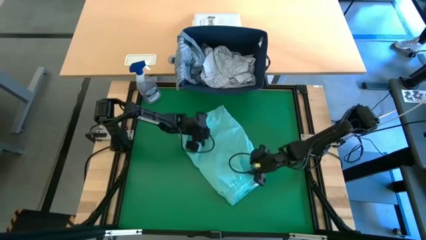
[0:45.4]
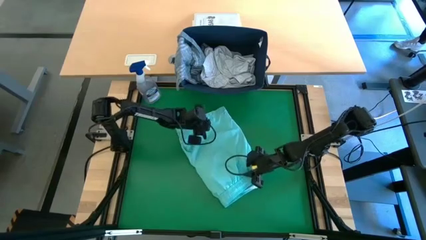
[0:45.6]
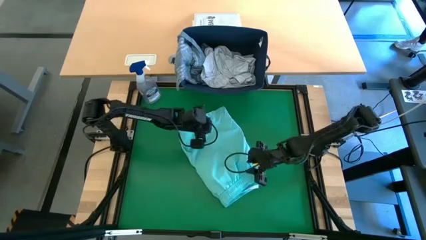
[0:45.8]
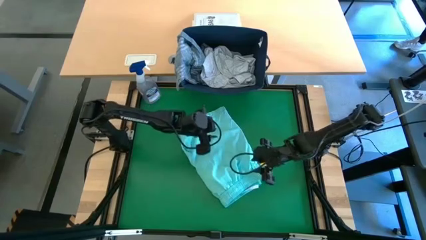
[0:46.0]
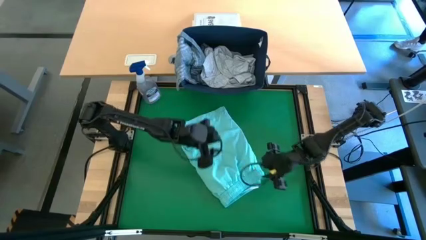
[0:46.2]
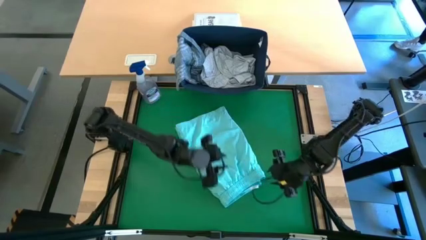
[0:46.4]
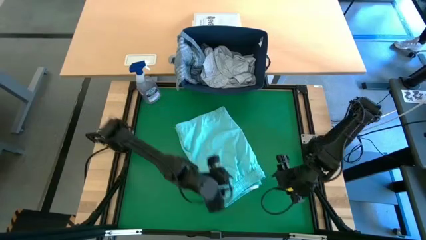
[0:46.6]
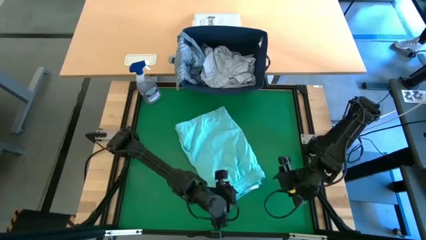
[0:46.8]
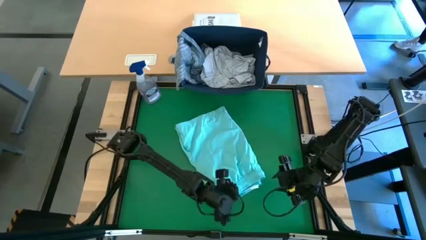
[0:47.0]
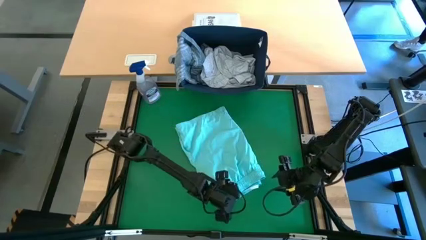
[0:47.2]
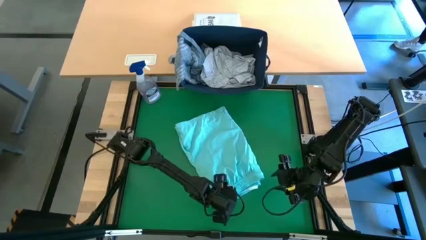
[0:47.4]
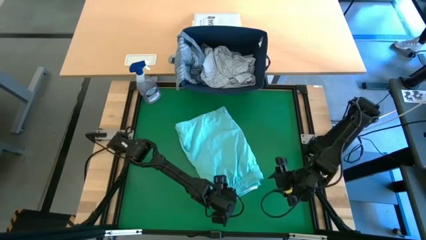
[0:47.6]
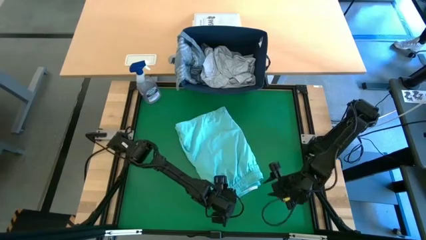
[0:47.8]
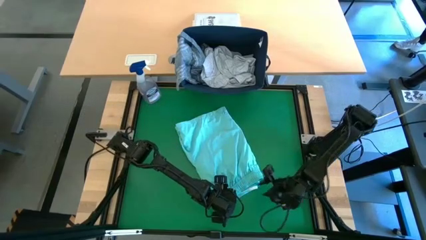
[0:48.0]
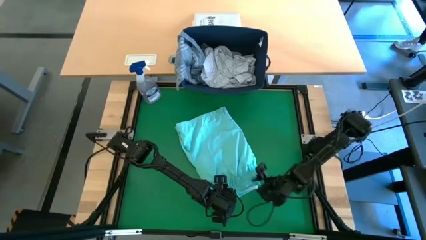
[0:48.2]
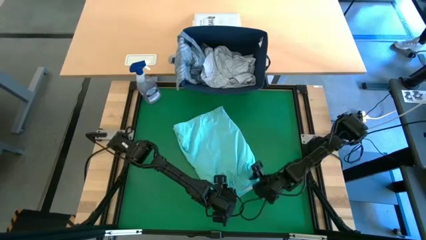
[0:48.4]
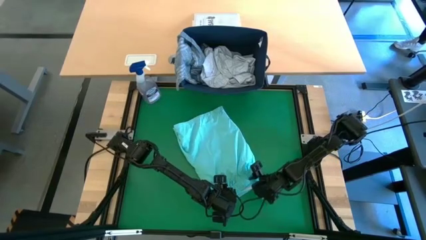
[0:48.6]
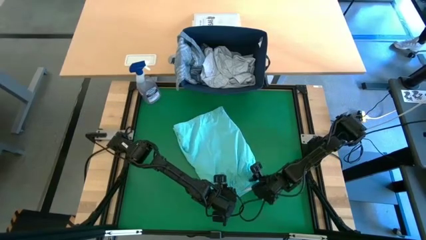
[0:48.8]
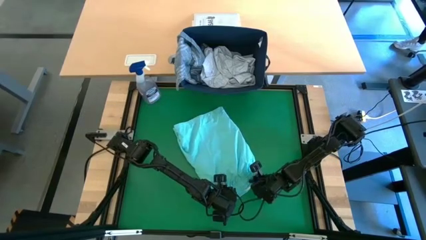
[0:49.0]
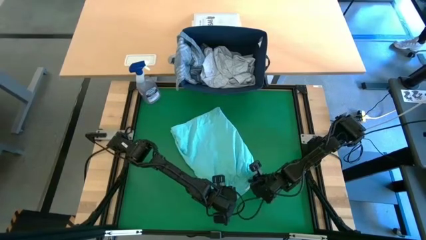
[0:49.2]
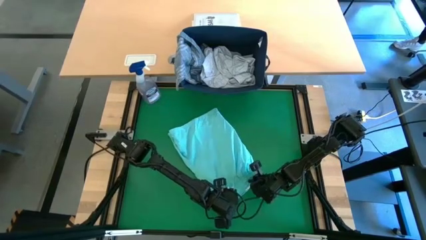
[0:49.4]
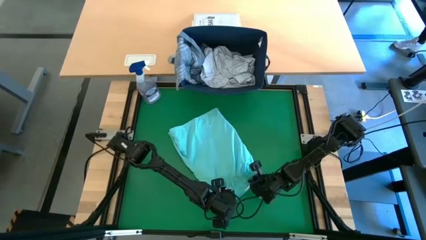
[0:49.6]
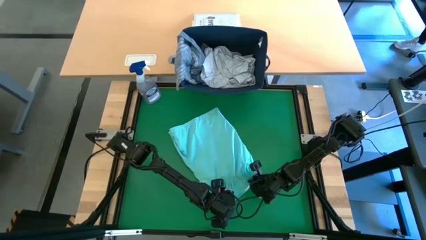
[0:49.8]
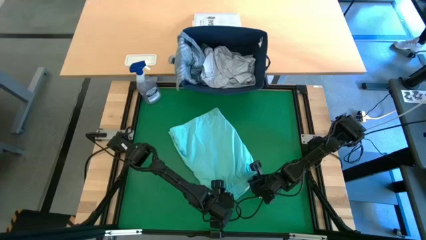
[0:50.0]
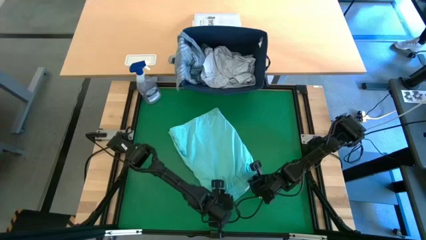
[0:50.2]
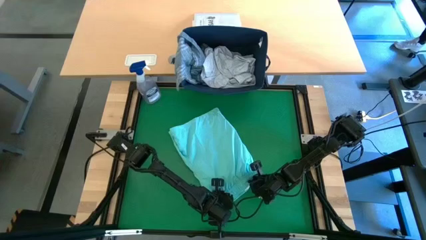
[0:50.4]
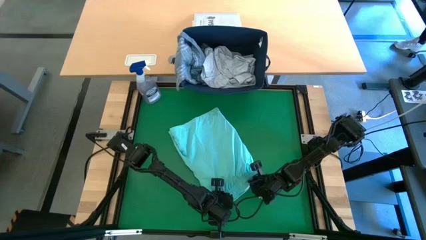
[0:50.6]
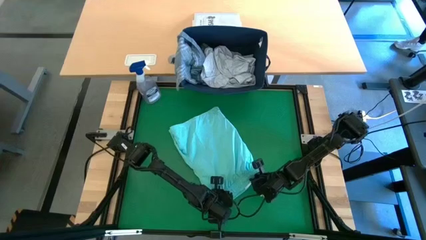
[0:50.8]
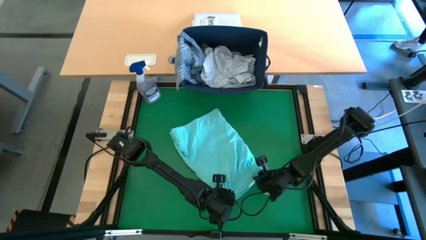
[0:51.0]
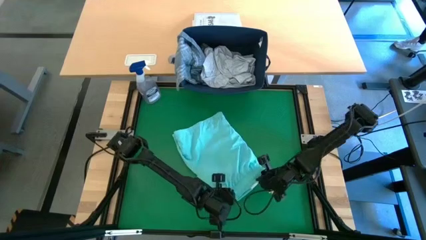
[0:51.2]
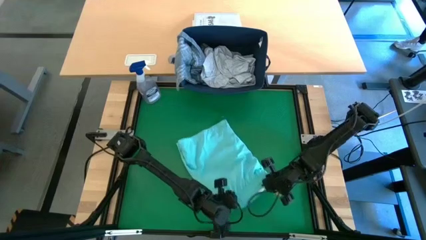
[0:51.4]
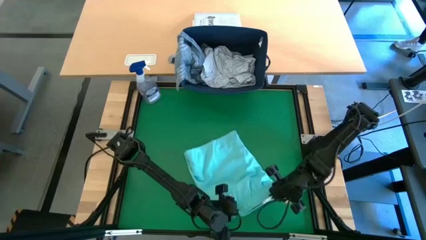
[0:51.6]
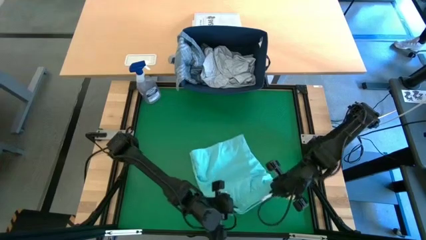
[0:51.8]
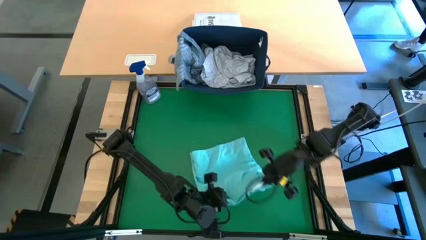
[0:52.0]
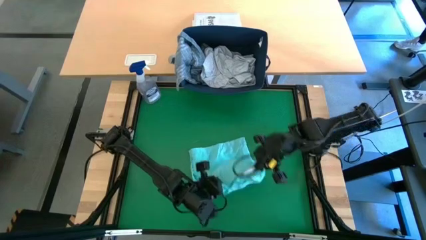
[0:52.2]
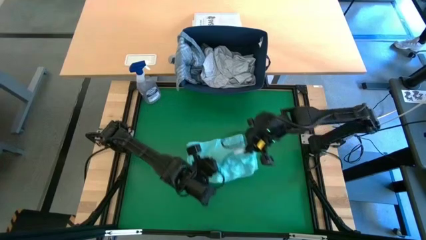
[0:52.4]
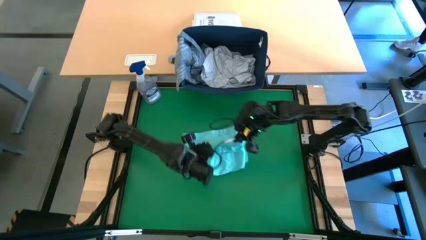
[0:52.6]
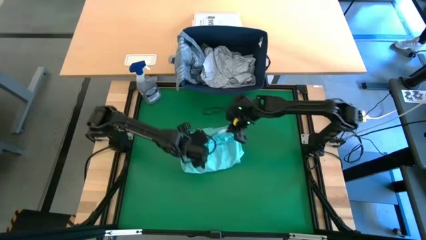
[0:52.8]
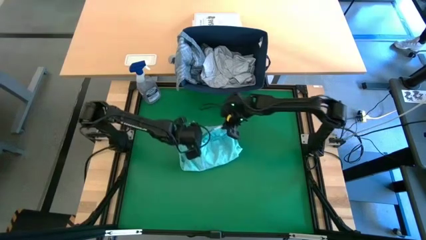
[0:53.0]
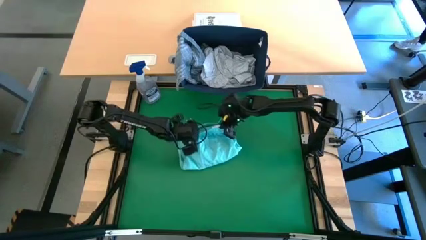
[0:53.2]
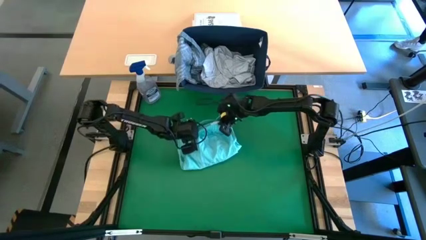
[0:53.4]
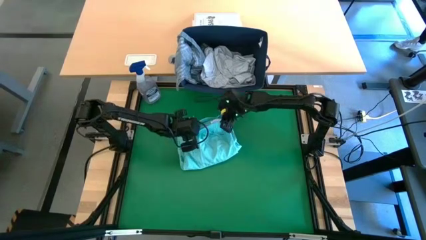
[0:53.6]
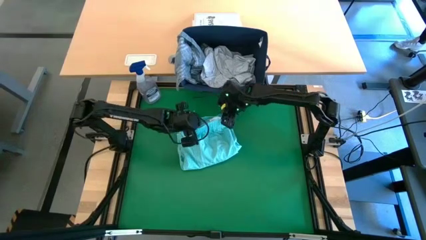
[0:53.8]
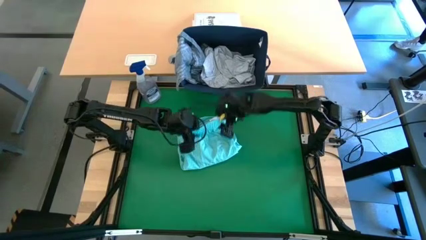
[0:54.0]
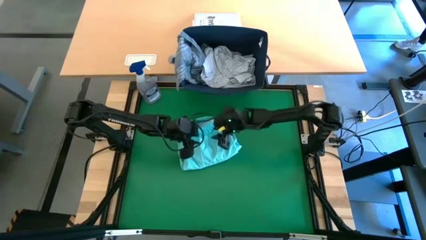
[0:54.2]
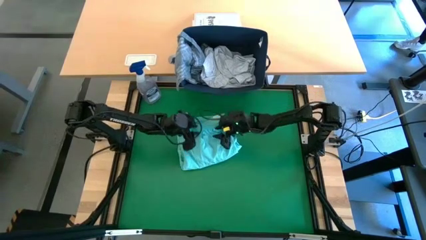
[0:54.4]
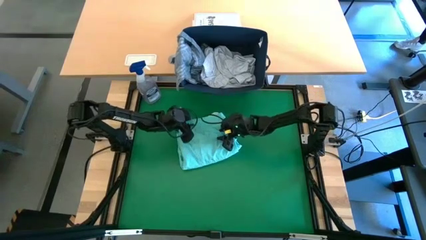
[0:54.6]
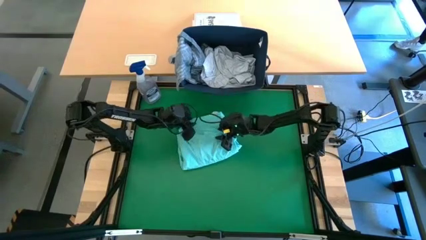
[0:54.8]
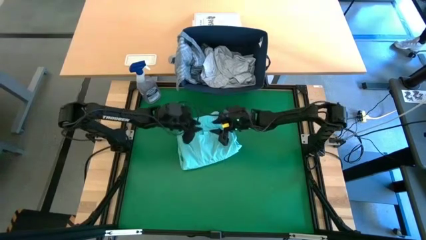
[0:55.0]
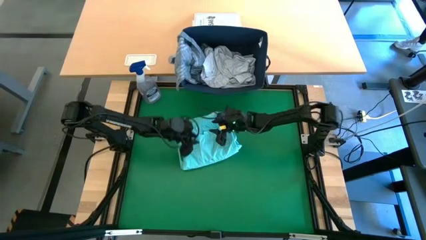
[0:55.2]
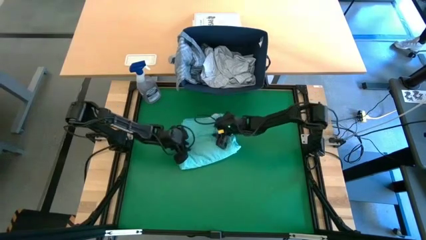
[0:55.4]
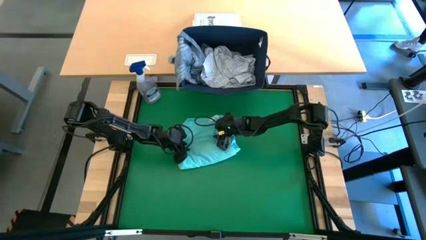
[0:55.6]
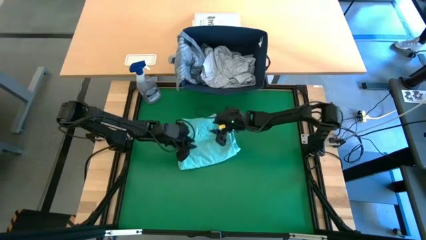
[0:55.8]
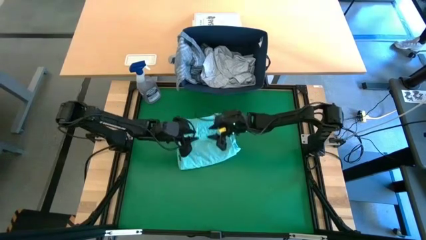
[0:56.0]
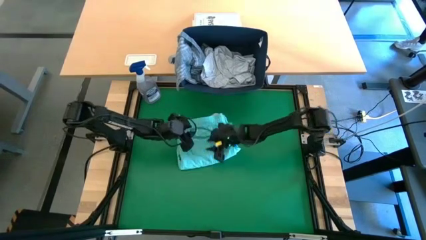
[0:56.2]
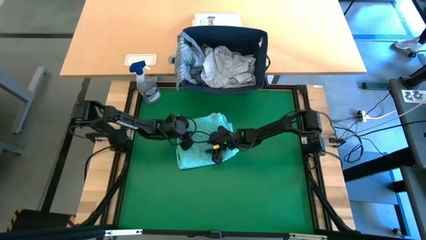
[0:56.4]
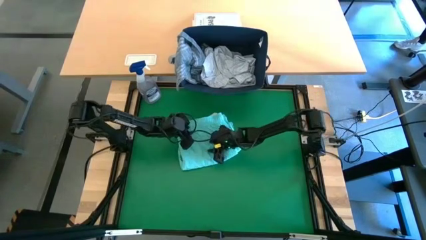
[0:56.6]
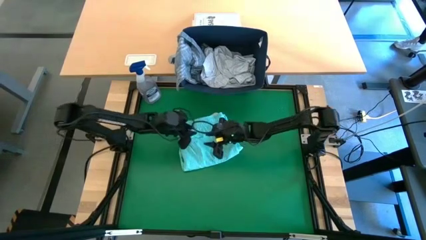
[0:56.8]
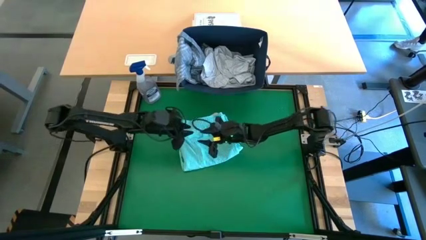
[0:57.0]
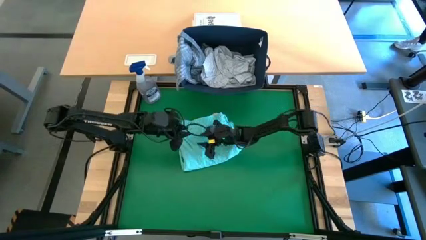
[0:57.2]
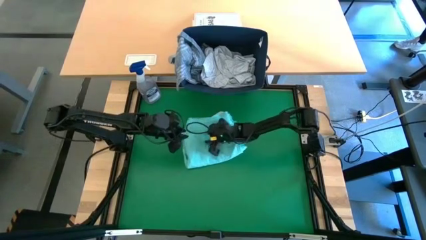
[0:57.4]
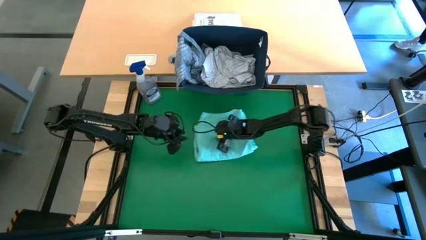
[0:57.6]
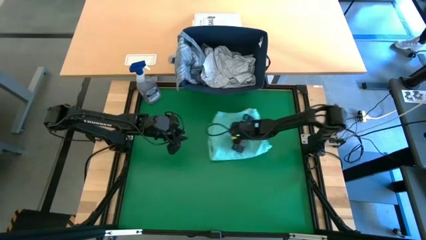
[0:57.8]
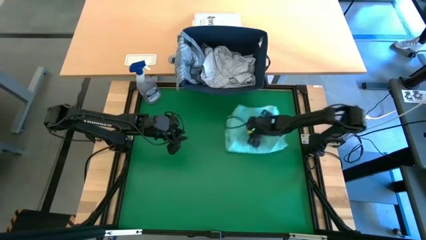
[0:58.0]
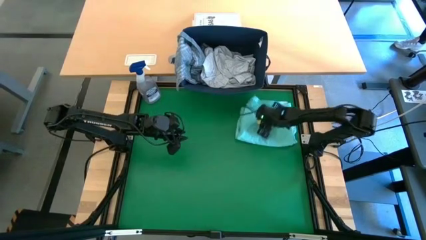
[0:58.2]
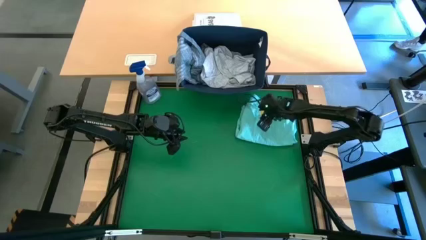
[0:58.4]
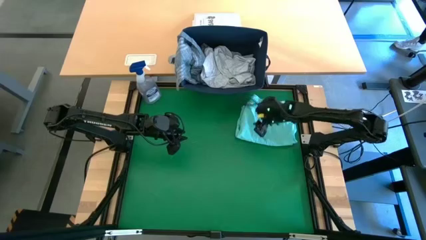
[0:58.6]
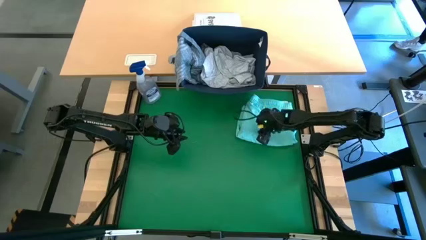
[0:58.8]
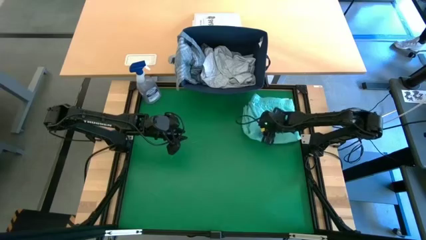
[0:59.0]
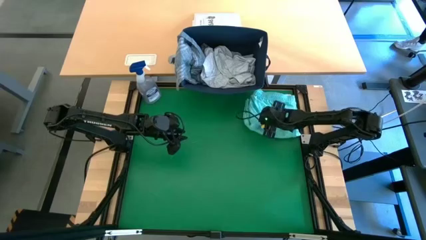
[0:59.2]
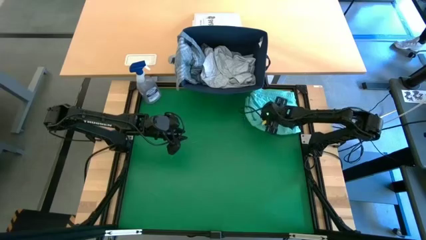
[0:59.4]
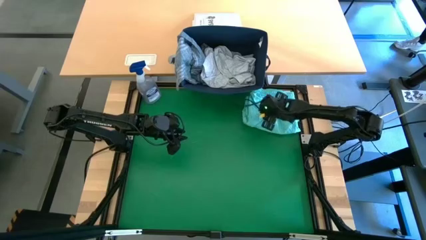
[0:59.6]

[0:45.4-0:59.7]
Task: Fold laundry
Fold the blue short

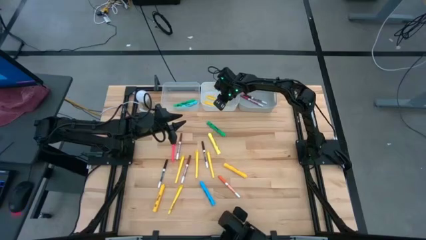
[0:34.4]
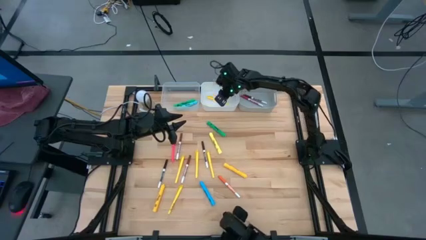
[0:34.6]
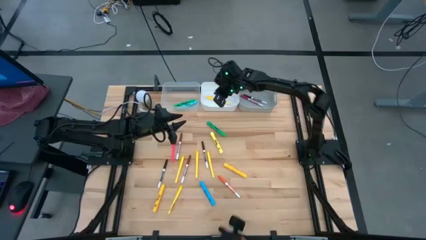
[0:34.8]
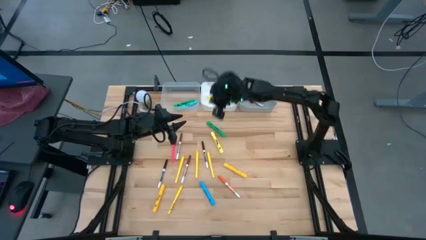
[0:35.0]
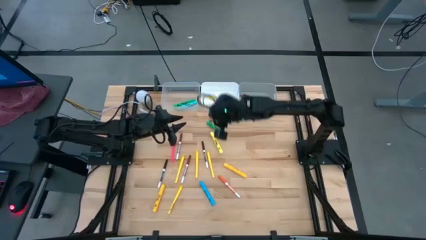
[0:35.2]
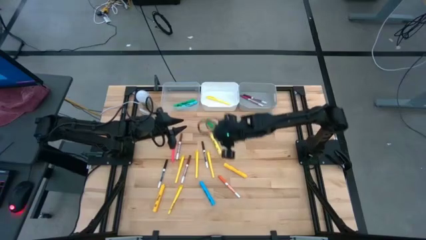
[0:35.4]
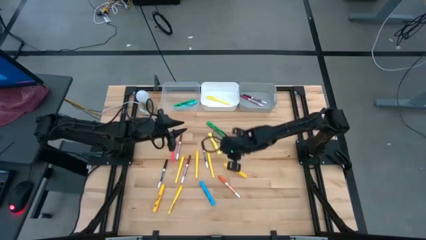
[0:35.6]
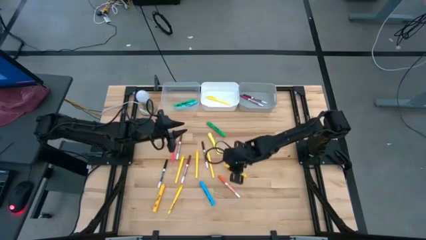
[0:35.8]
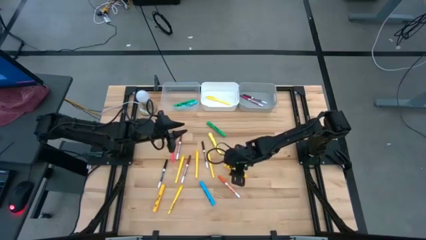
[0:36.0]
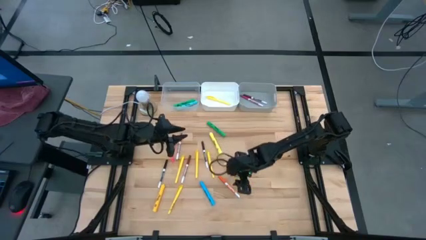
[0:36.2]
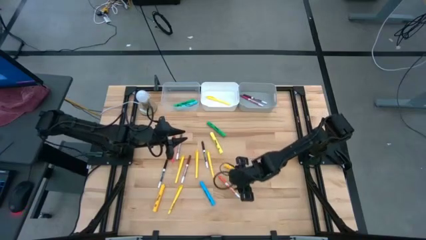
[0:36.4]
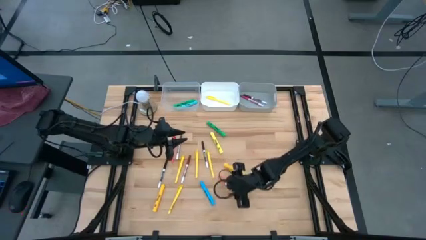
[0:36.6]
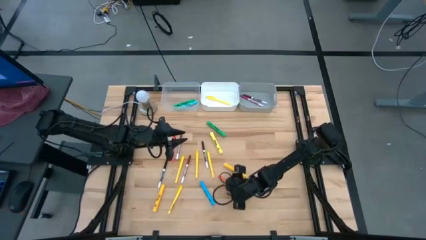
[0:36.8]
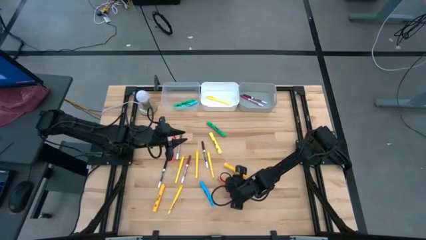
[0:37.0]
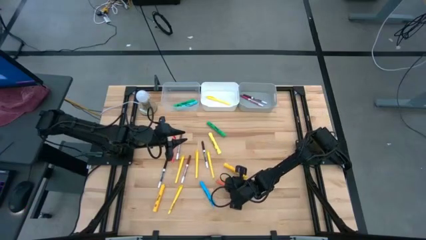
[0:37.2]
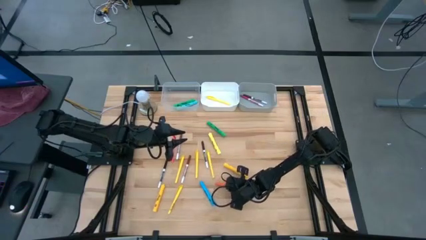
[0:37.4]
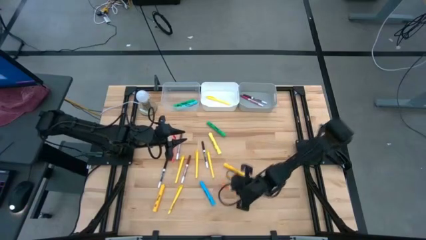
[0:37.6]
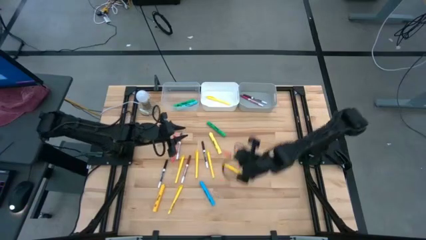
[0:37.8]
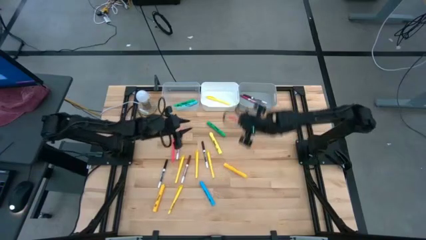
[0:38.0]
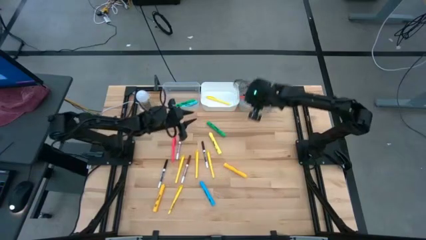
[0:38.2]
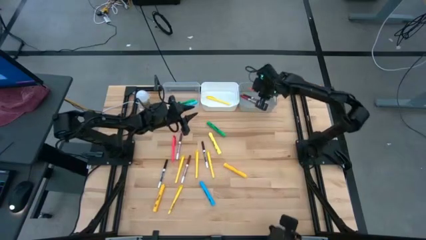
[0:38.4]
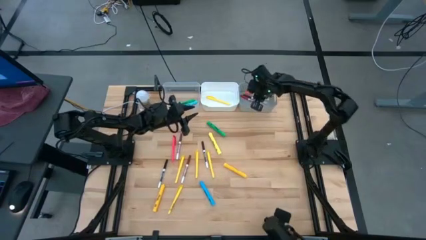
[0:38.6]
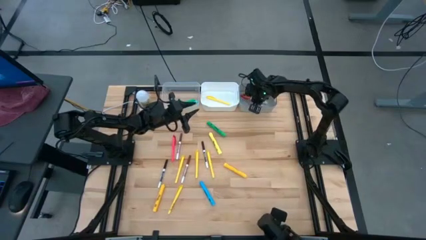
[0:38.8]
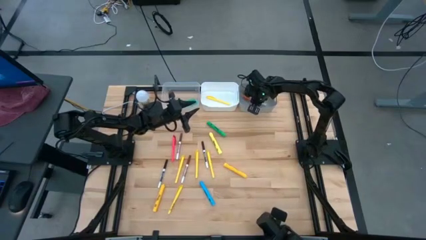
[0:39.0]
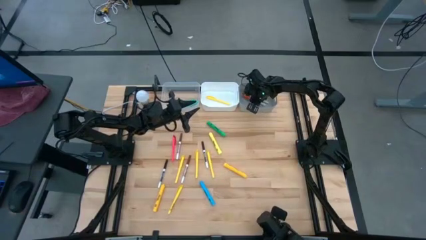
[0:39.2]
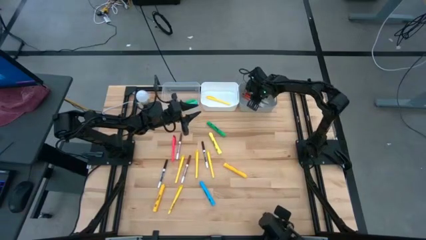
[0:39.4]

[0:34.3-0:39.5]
Task: Pick & Place Markers
Put the orange marker pen into the gray bin
